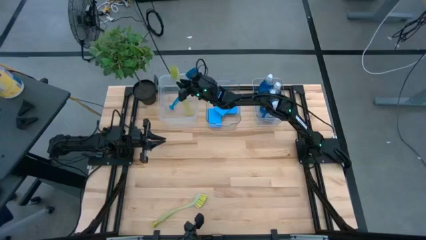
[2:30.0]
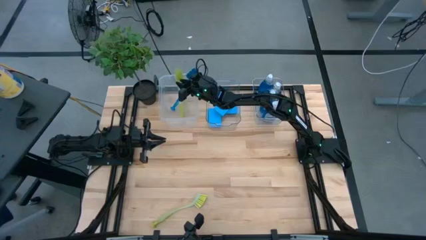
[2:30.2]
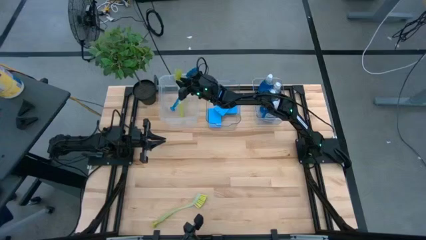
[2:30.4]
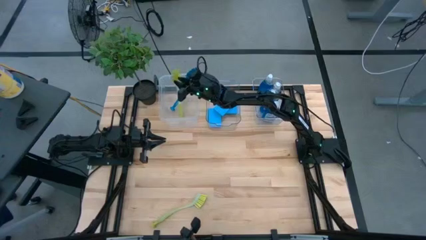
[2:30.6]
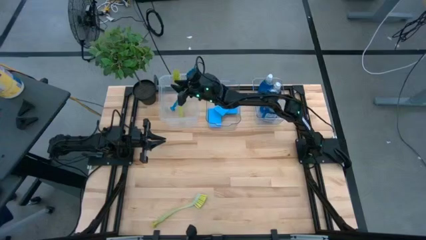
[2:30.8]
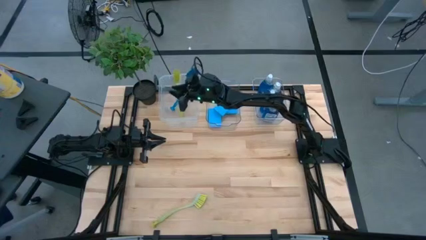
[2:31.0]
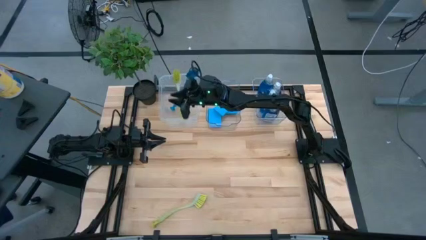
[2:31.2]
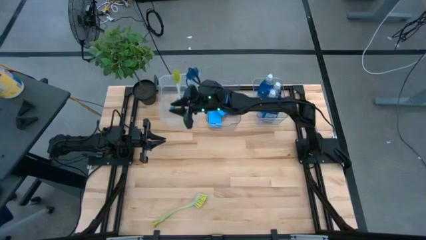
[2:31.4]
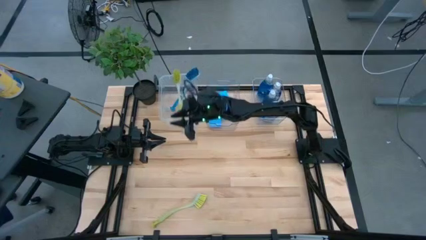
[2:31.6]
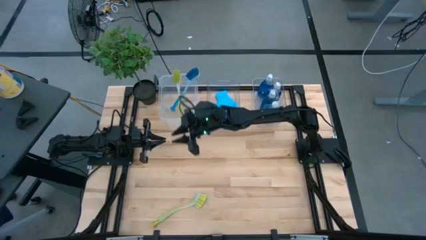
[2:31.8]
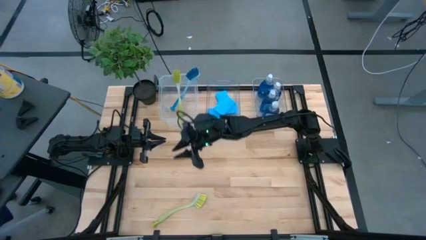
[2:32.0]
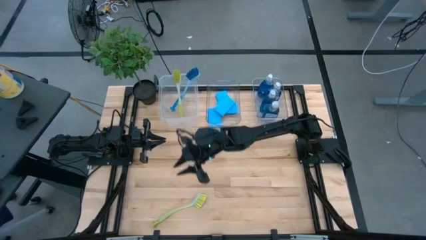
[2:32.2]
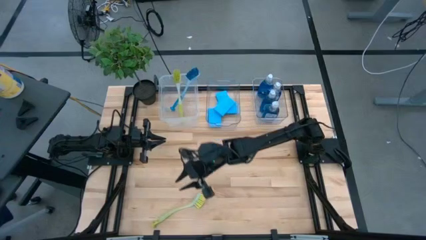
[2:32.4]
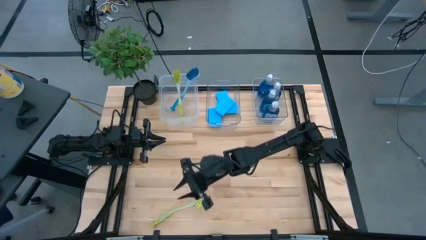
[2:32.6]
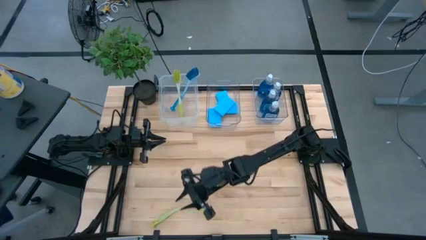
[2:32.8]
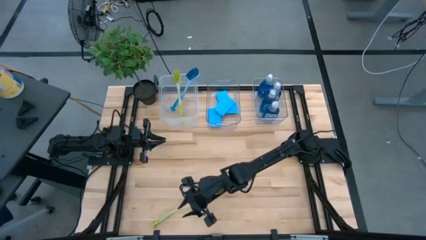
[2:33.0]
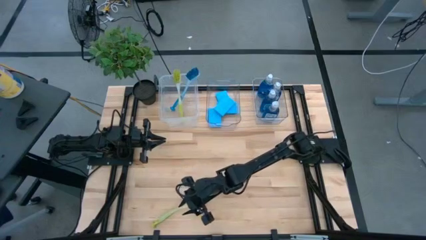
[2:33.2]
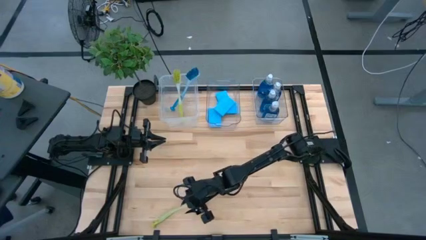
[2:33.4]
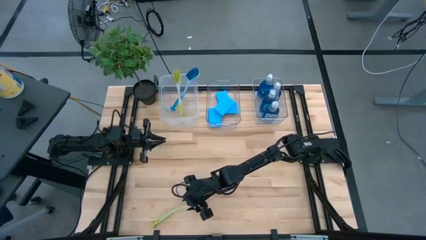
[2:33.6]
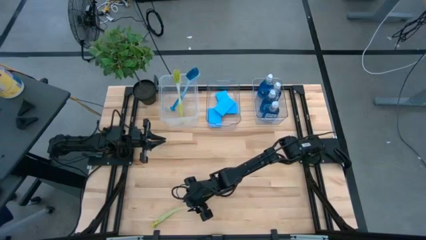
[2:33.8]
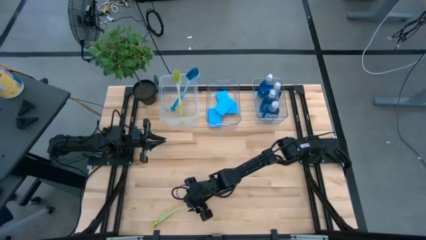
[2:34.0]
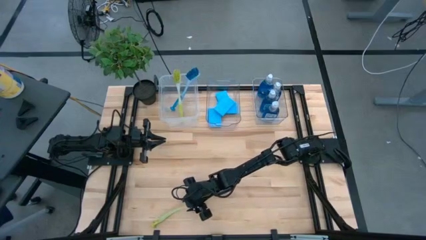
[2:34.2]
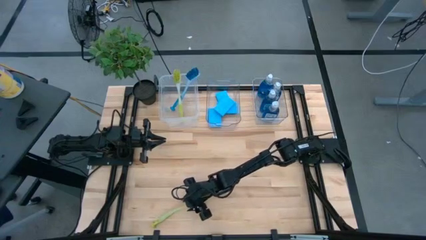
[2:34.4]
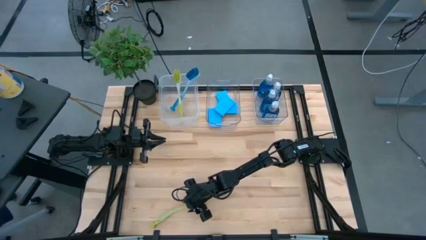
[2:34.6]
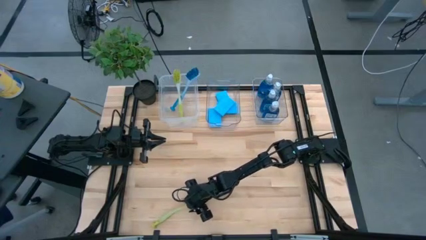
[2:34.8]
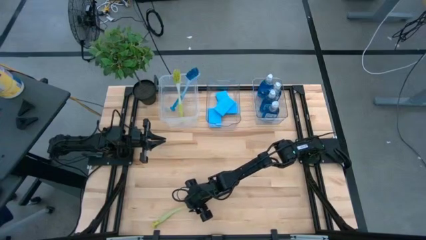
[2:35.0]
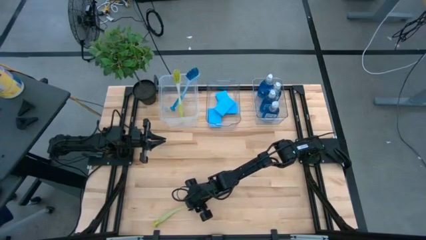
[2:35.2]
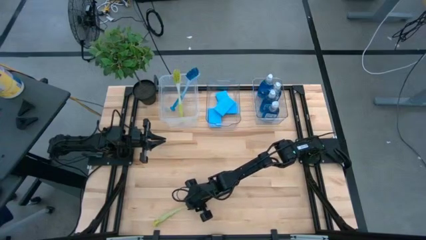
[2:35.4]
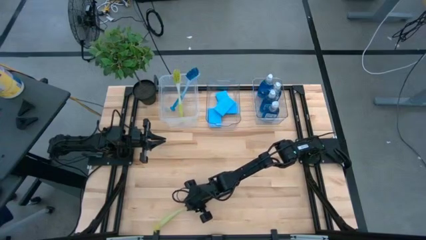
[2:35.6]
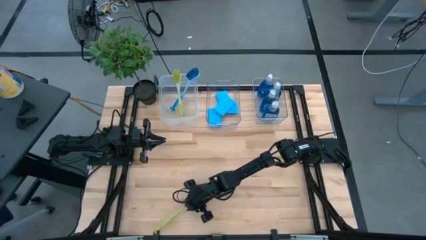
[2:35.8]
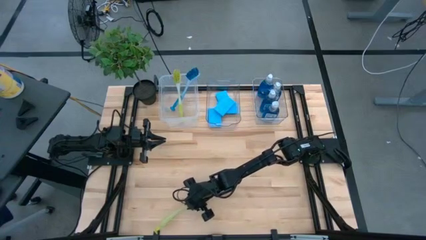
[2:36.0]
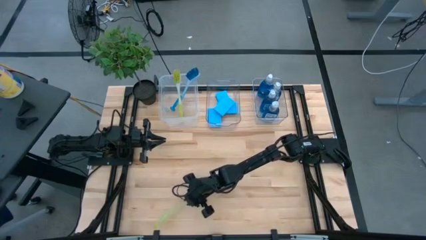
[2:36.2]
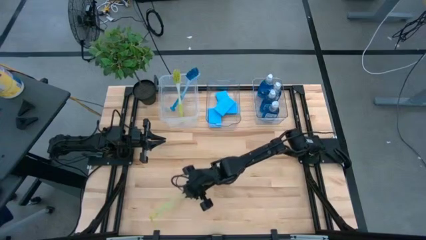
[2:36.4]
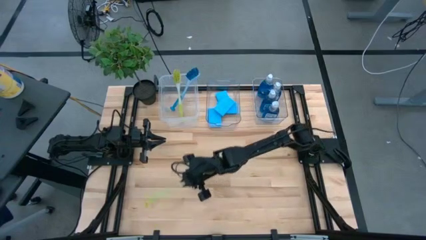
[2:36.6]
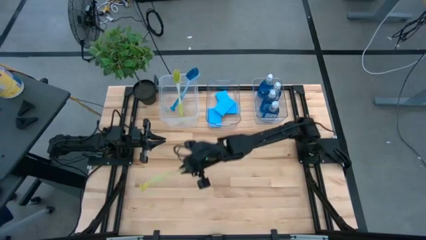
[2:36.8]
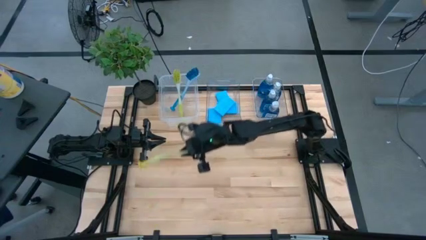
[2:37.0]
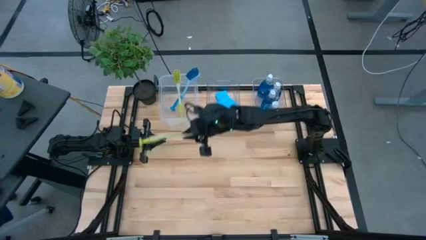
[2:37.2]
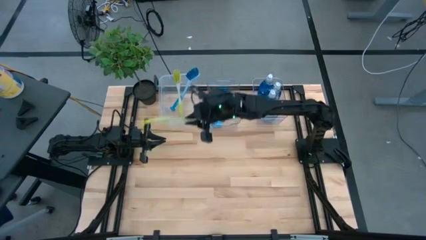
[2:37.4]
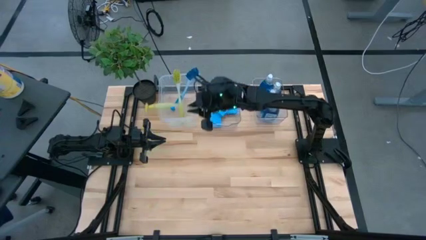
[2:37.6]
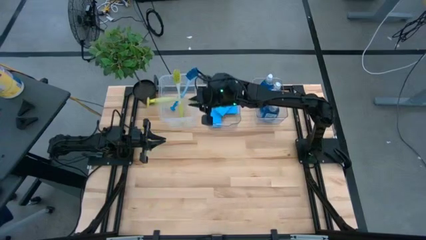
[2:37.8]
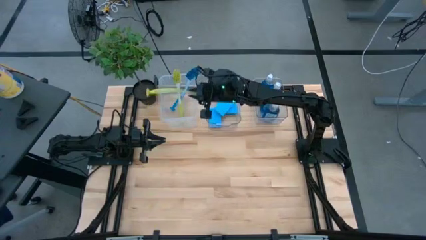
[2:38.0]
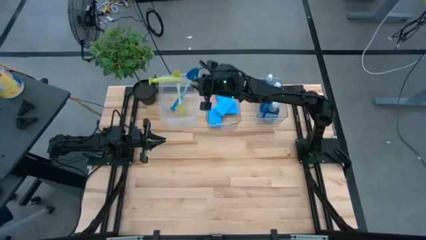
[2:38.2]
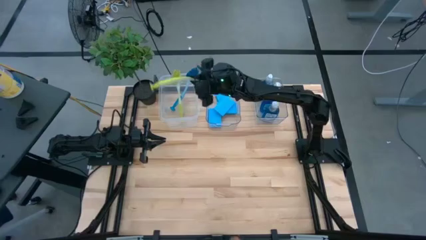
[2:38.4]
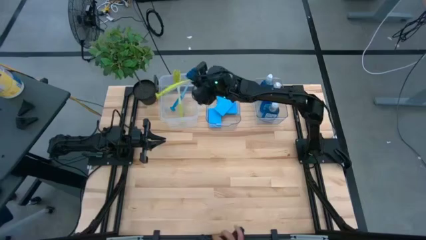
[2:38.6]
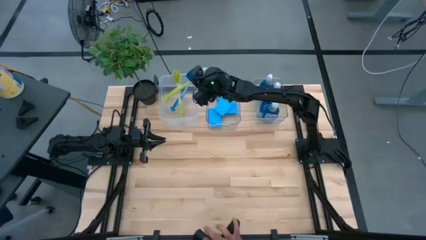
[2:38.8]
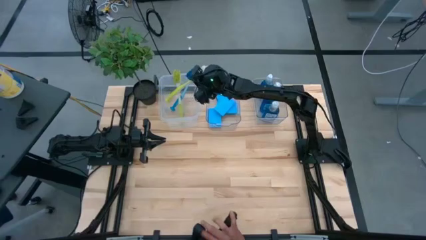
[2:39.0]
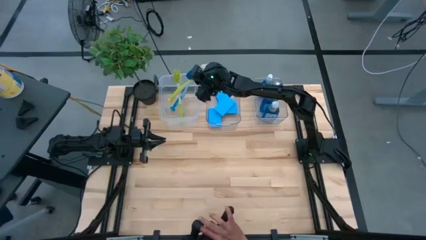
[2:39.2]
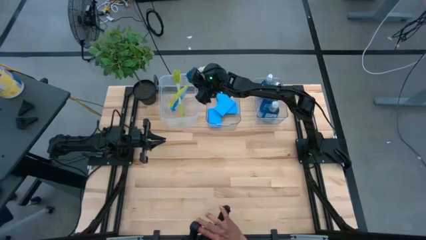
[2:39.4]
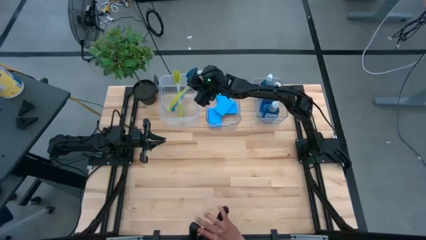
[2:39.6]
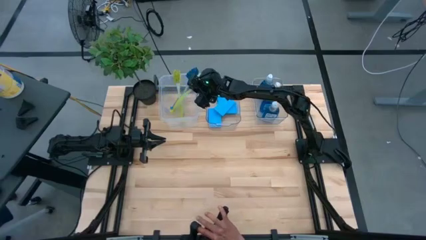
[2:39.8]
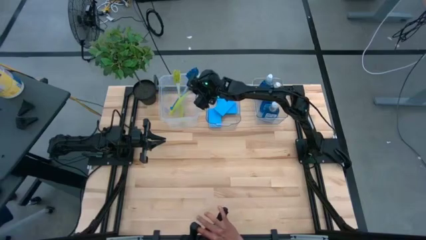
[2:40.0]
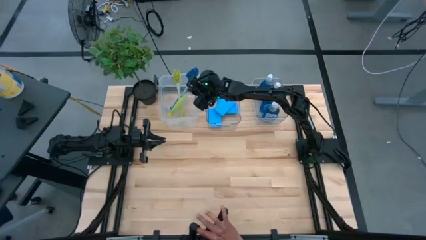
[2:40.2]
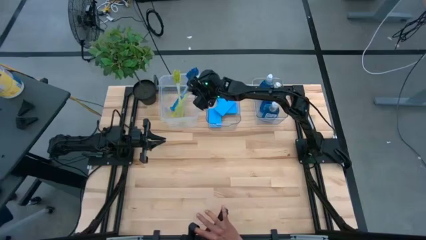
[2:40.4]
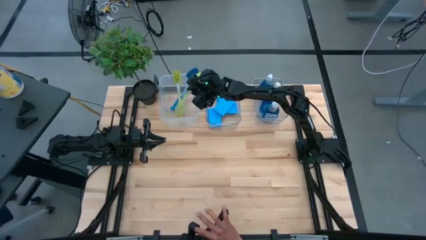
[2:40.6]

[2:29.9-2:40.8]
Task: Pick & Place Kitchen Sink Supplies
Put the yellow cleaning brush into the left transparent bin

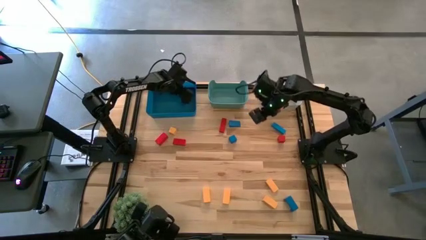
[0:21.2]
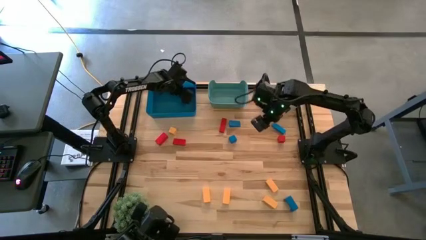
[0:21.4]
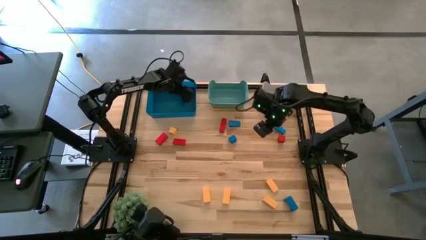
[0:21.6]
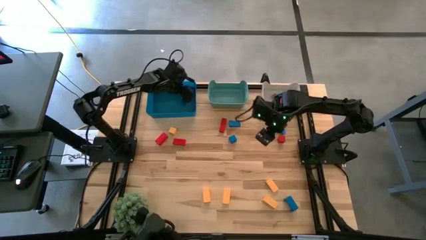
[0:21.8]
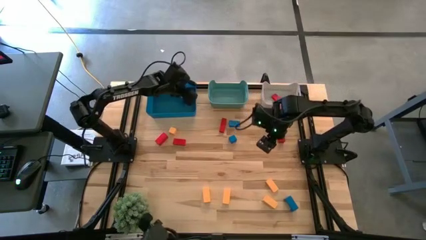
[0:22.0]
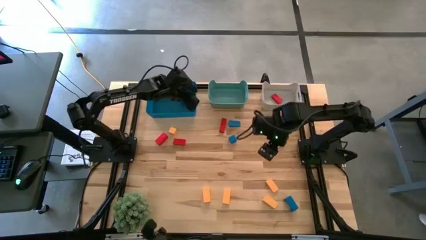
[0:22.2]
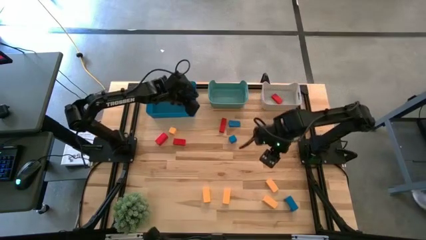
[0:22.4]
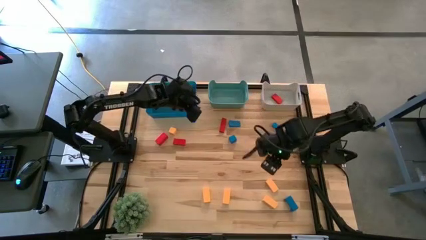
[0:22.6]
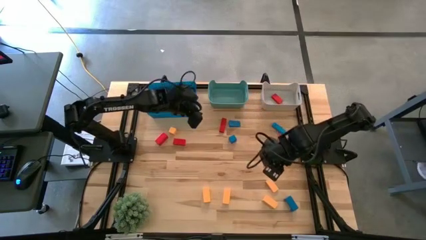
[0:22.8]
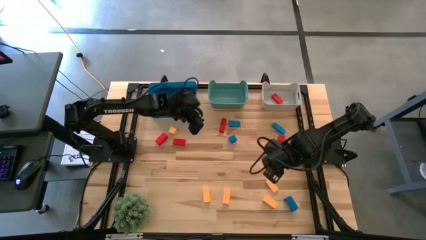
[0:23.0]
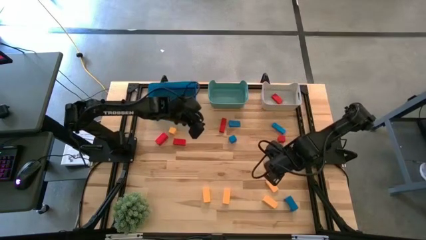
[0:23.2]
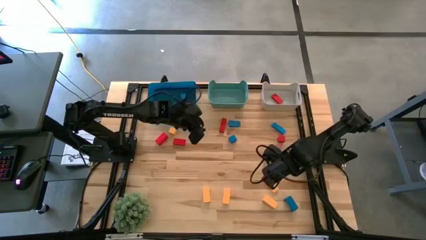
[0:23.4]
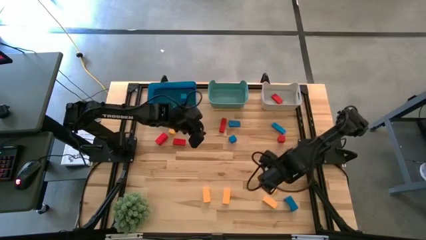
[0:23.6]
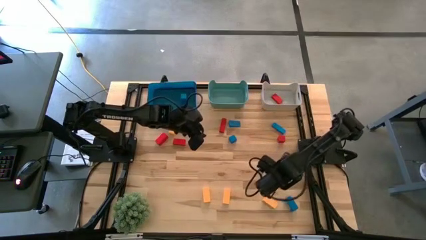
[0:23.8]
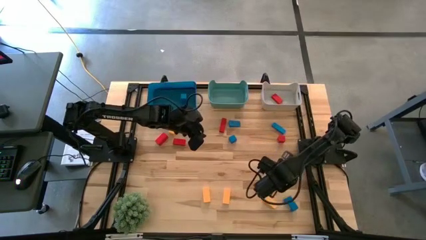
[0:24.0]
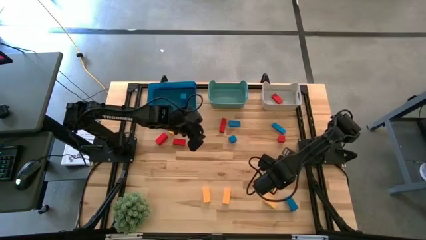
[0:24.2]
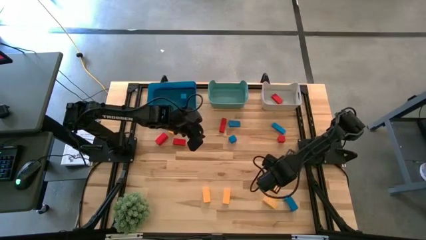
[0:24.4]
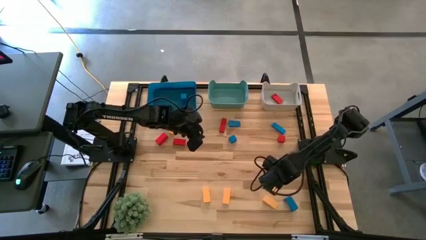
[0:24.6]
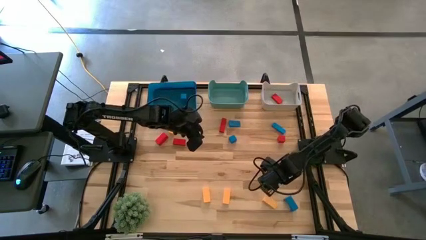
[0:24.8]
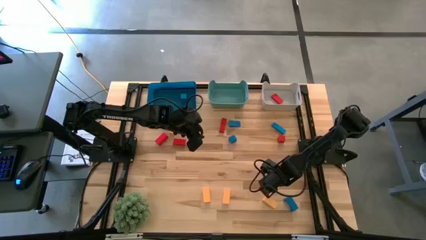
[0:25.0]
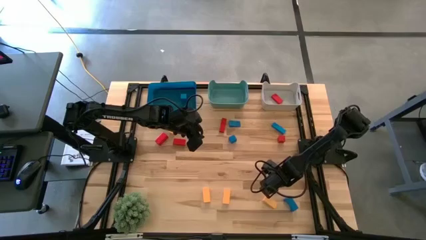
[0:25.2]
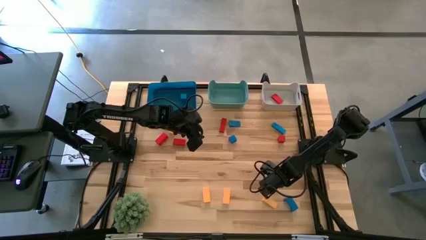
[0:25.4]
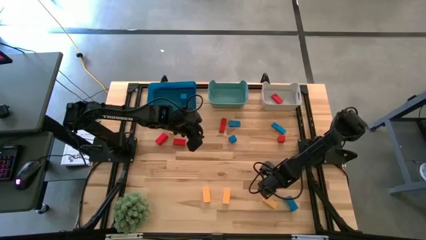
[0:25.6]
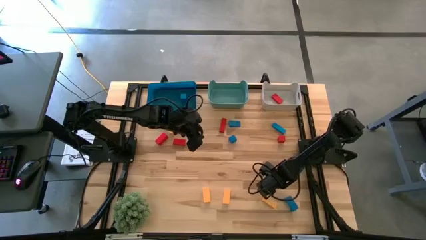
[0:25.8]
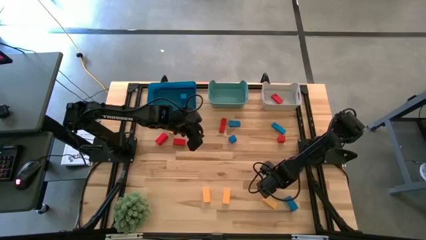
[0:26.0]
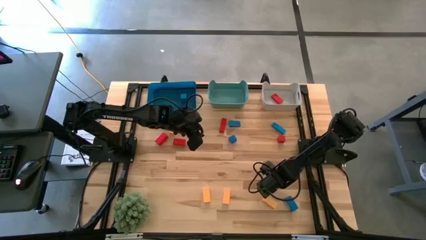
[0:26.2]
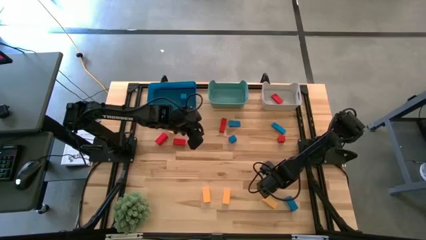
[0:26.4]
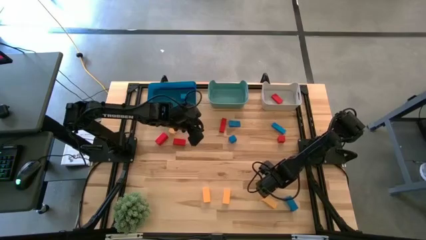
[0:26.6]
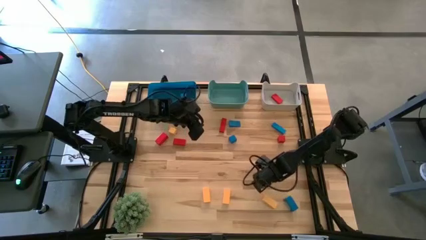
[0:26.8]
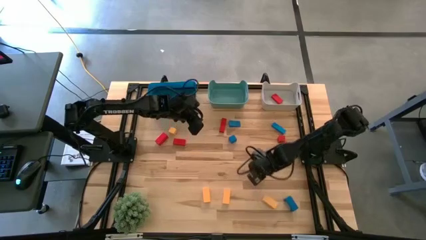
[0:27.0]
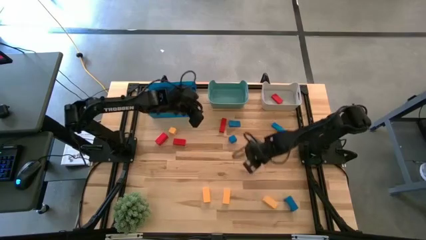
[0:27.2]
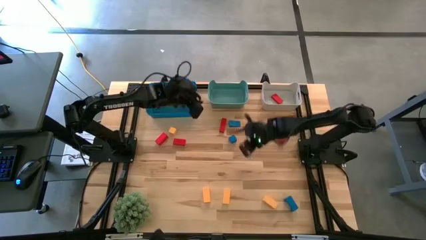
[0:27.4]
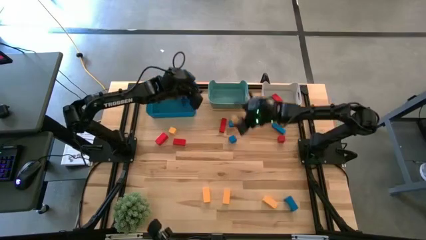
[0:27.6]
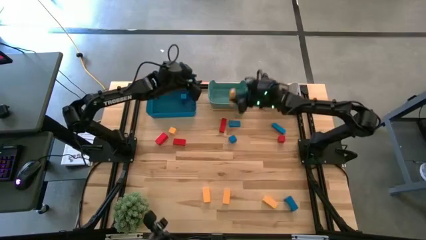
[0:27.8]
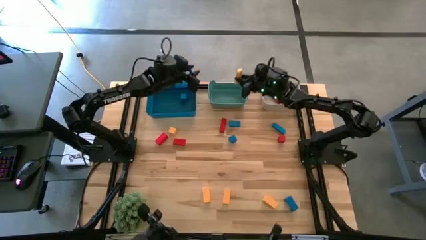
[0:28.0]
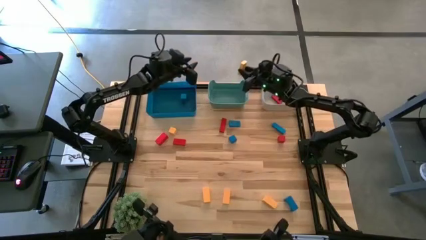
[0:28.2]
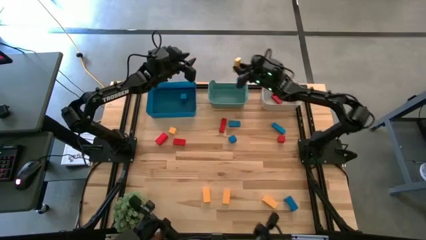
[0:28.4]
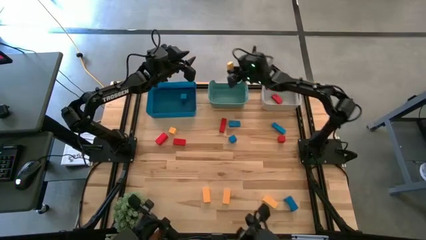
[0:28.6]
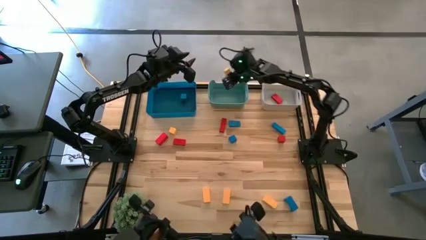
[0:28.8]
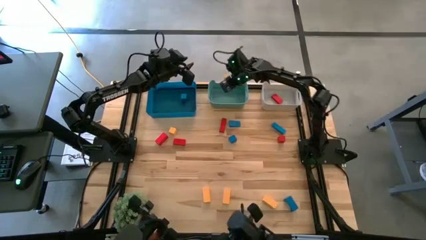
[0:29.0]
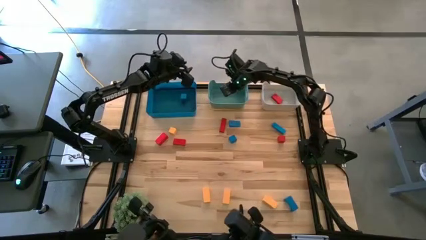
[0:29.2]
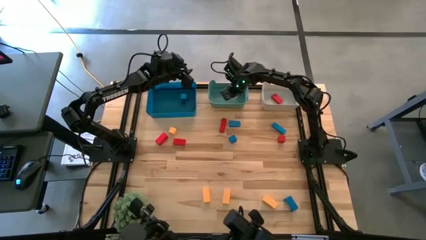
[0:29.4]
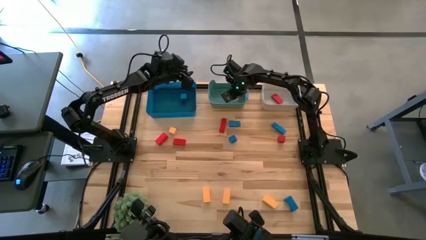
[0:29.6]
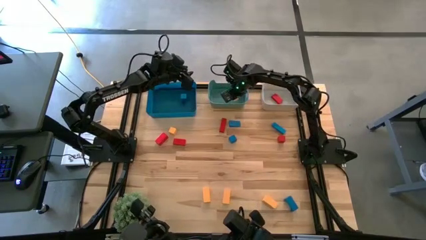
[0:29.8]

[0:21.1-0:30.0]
Task: Sort & place blocks by color
Put the yellow block into the green bin
